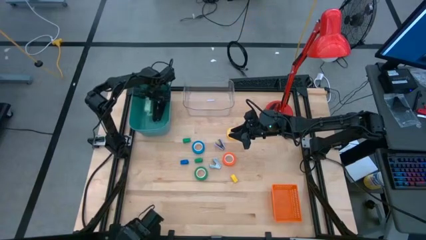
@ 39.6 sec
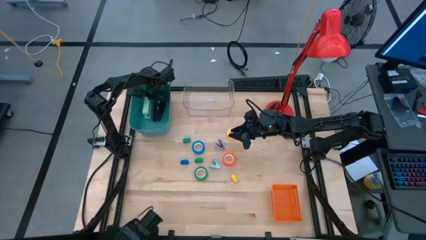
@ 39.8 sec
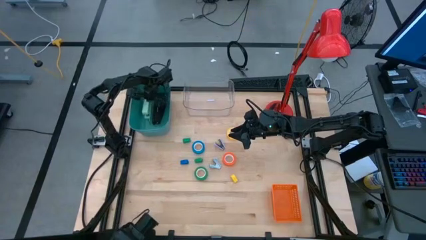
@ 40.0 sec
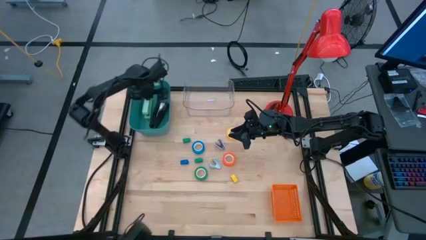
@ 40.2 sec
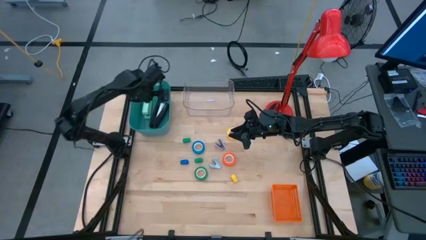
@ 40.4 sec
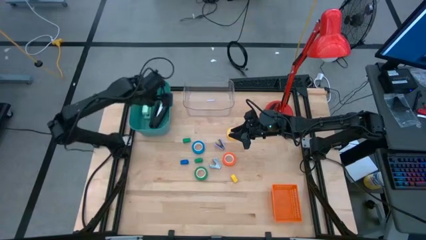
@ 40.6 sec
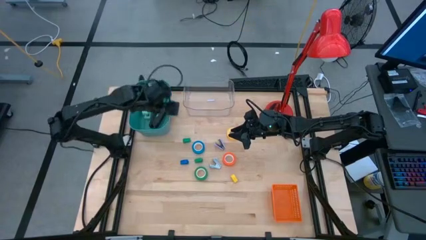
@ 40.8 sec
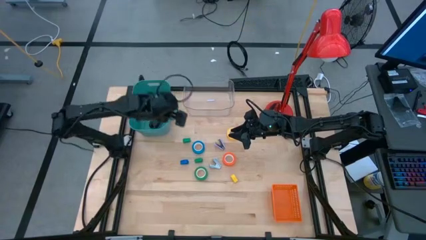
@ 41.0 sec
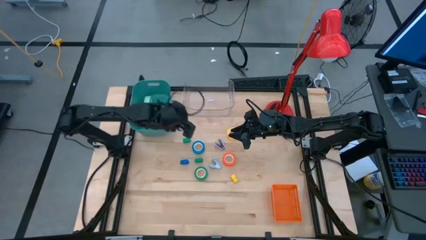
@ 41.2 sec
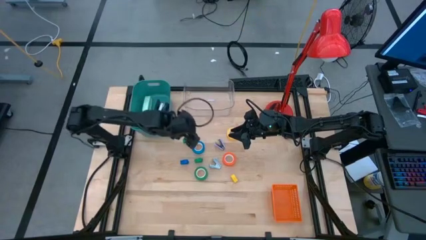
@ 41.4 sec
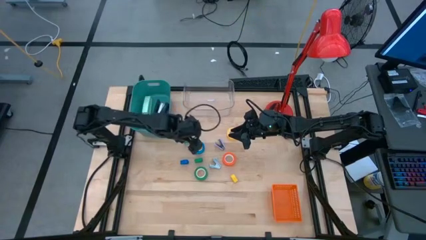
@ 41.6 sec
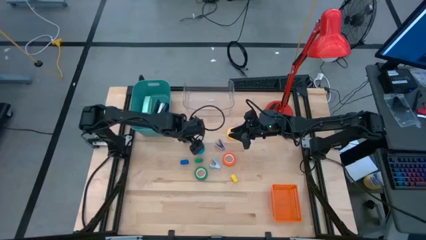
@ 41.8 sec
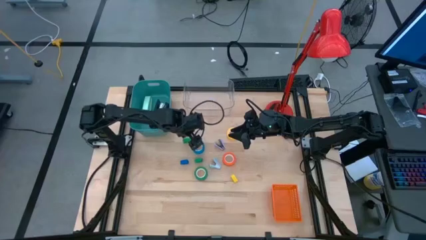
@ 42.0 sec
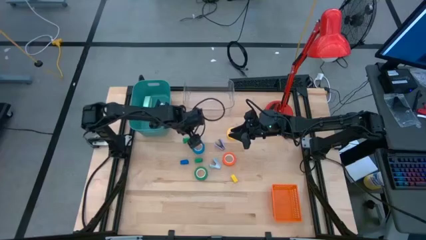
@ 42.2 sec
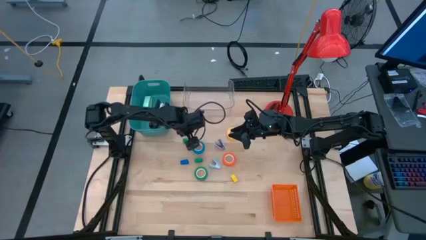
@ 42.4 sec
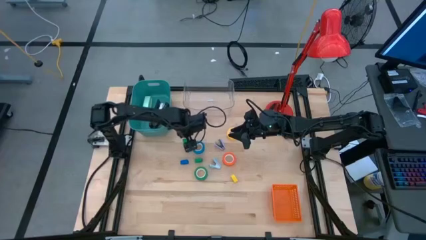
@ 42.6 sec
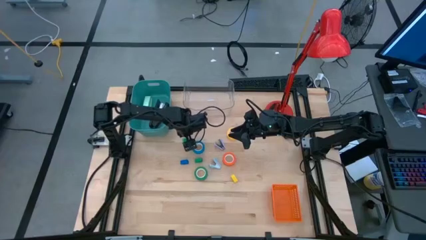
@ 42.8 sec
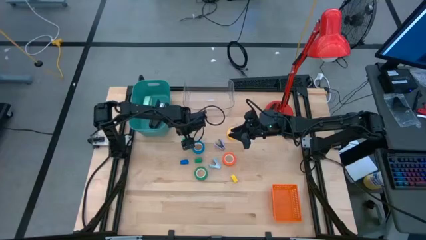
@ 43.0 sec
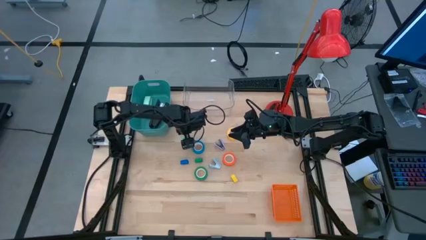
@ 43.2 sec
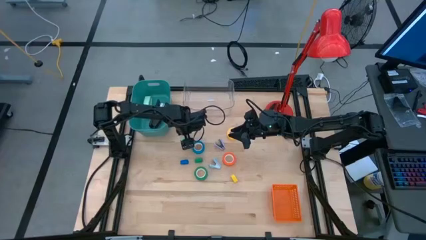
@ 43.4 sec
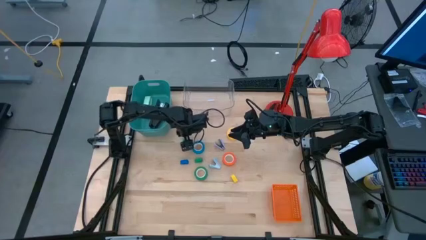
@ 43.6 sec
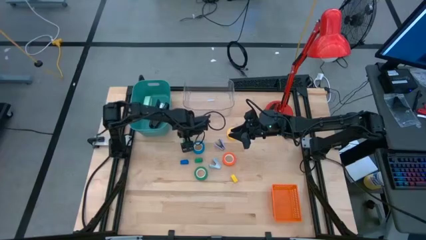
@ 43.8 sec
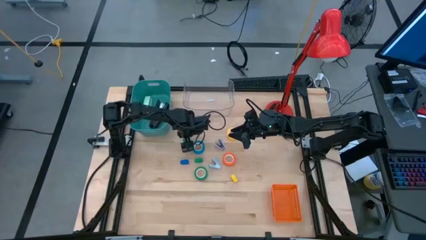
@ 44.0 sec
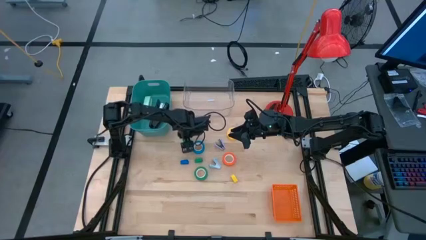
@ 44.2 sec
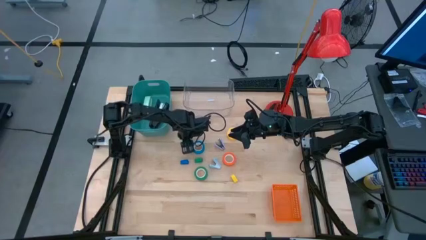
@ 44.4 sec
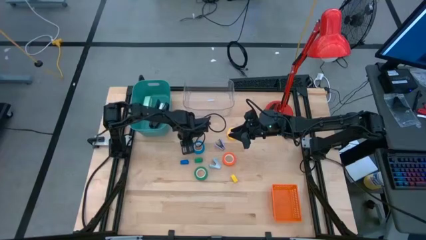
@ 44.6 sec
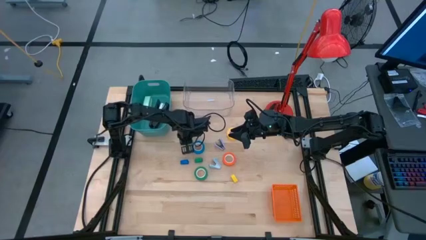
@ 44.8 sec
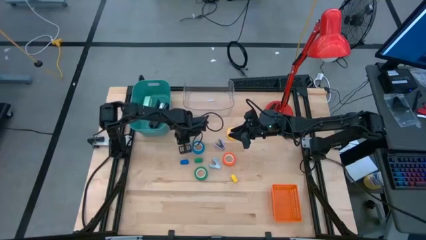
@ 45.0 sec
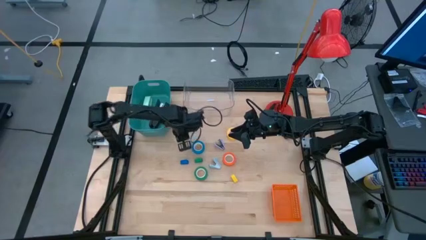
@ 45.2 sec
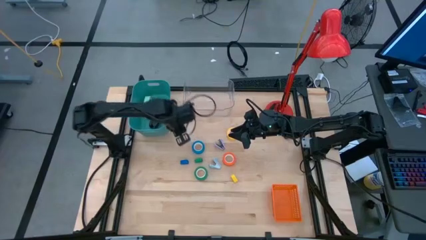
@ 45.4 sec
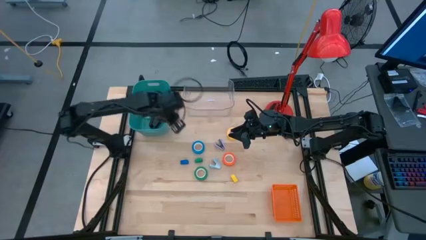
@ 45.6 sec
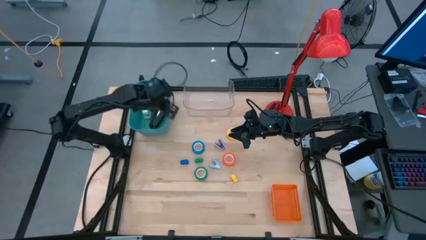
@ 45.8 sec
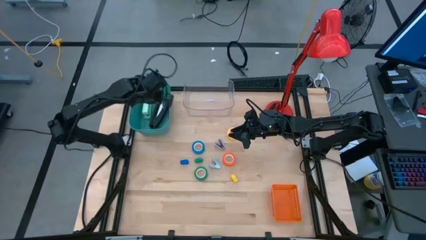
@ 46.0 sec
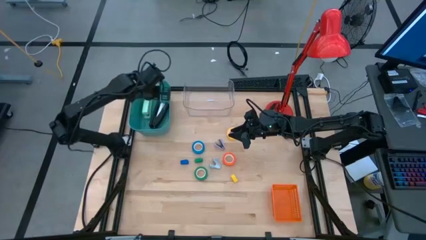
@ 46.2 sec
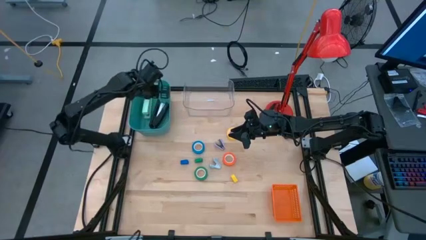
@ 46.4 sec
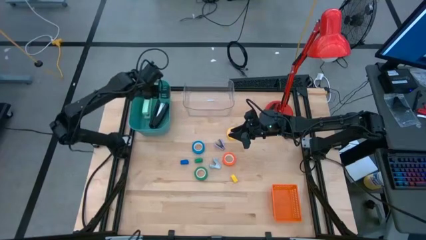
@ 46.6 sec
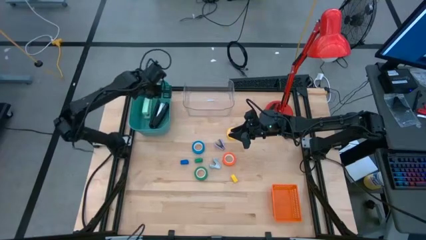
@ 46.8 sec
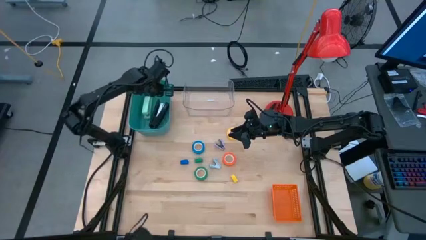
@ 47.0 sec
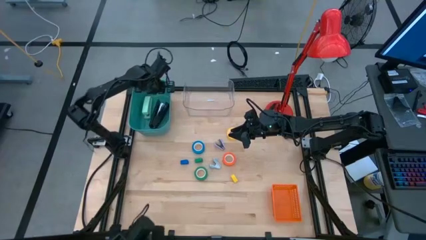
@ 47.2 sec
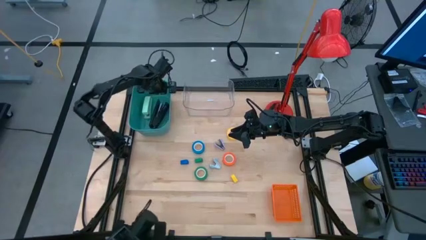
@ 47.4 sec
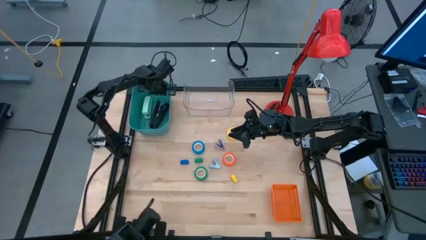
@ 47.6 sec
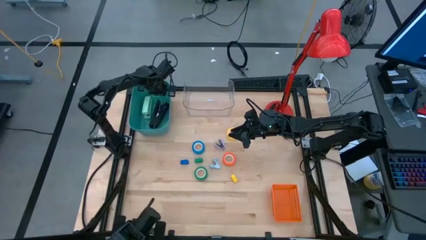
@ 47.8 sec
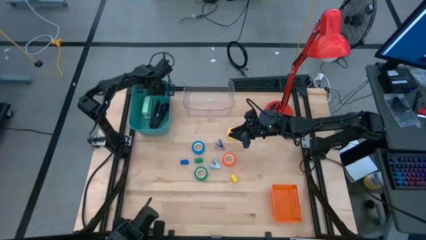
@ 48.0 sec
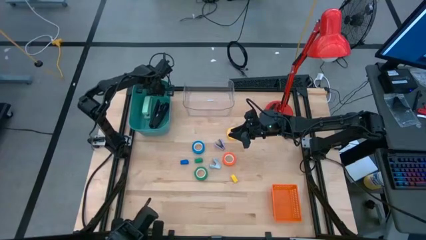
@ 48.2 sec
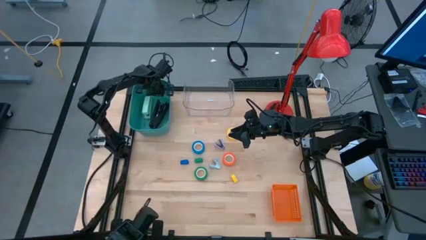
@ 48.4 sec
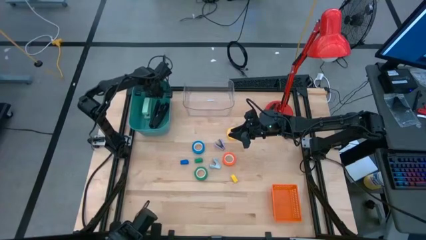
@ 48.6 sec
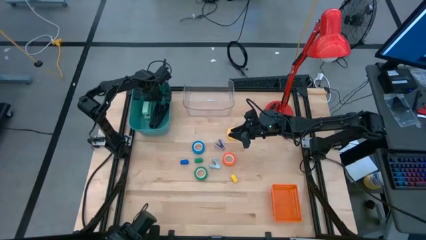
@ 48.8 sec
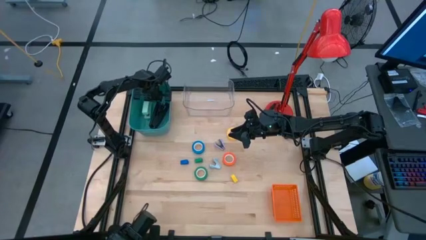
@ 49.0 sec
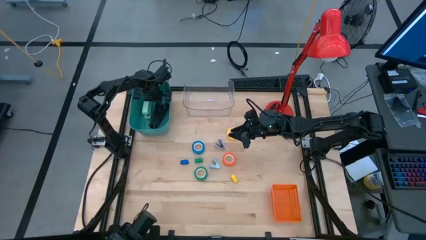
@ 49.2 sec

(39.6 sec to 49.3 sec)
Task: Pick and place Stapler, Stapler remover, tape
Put the top green stapler into the green bin

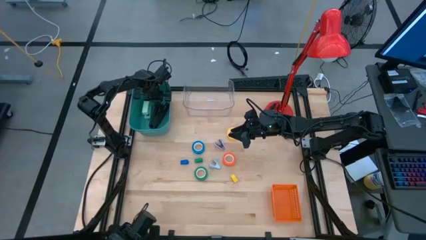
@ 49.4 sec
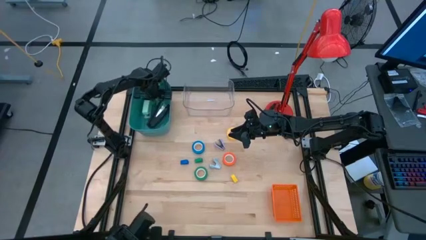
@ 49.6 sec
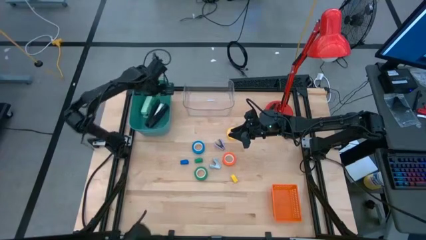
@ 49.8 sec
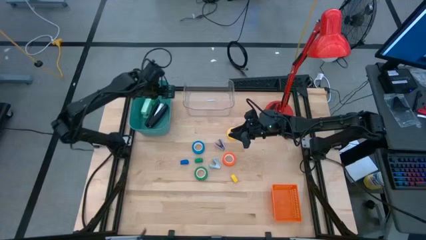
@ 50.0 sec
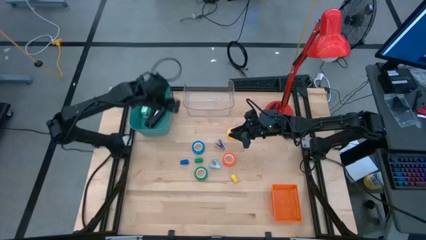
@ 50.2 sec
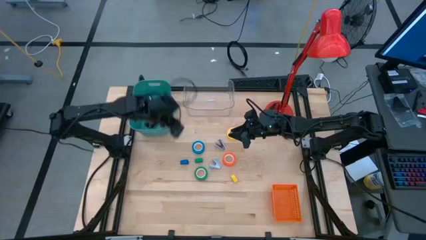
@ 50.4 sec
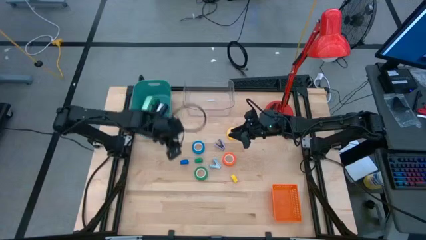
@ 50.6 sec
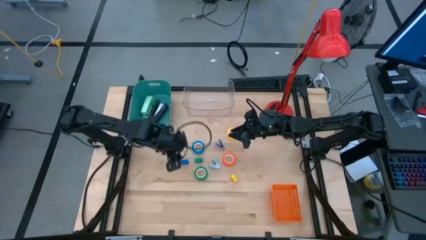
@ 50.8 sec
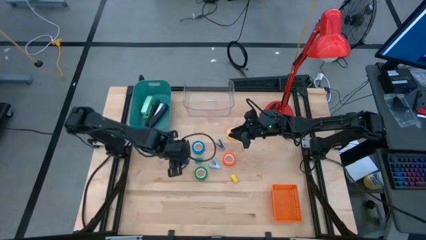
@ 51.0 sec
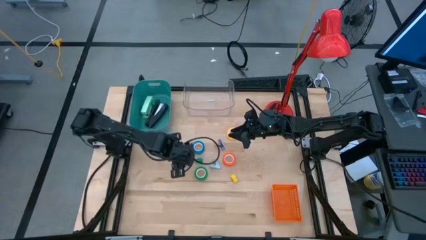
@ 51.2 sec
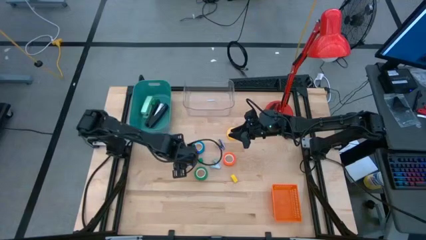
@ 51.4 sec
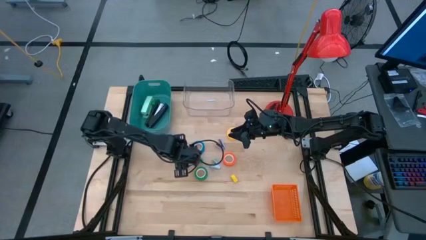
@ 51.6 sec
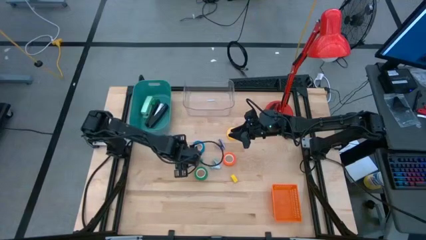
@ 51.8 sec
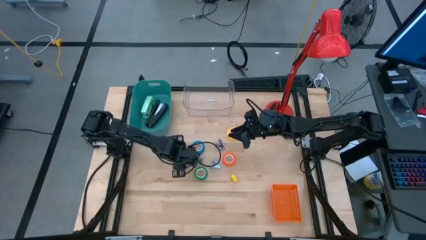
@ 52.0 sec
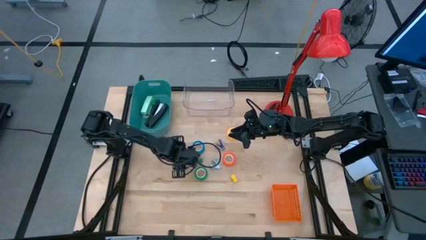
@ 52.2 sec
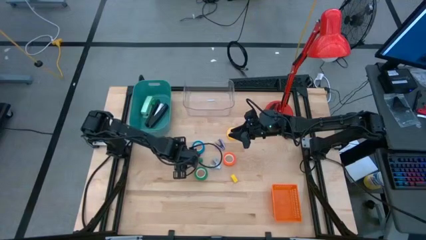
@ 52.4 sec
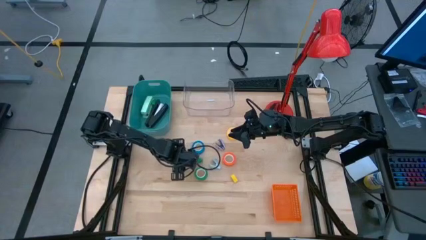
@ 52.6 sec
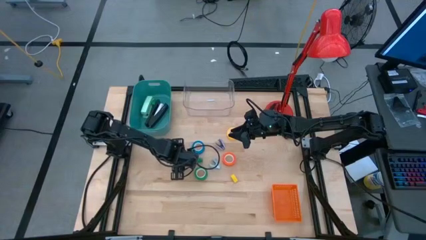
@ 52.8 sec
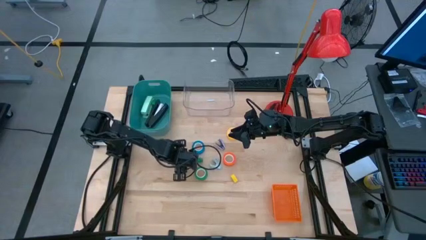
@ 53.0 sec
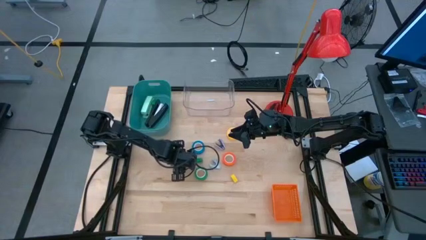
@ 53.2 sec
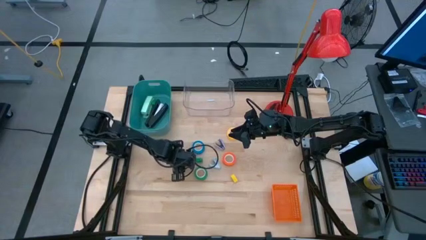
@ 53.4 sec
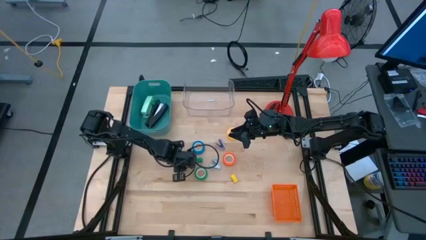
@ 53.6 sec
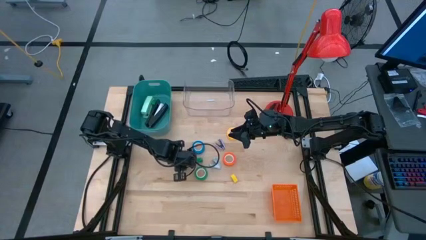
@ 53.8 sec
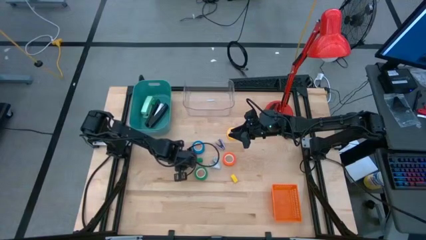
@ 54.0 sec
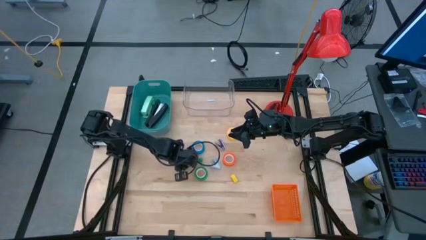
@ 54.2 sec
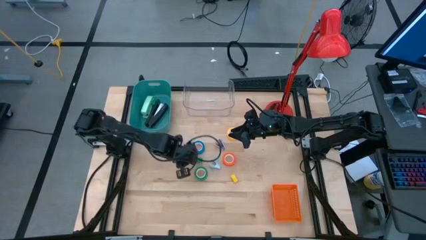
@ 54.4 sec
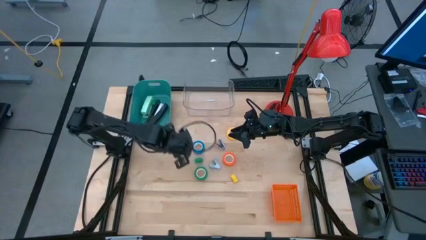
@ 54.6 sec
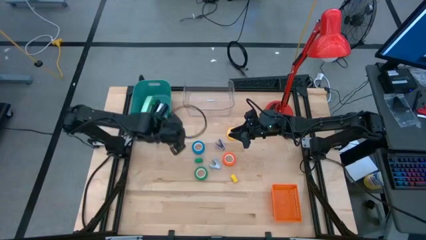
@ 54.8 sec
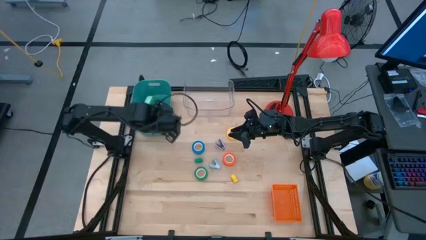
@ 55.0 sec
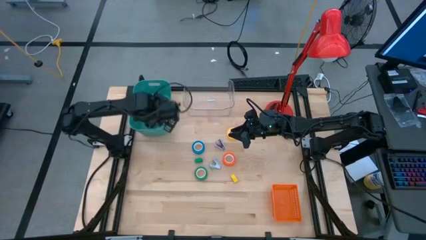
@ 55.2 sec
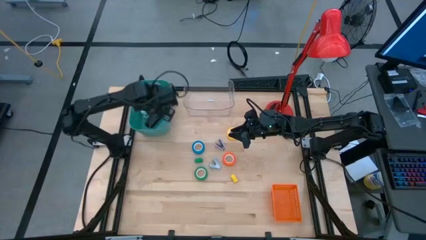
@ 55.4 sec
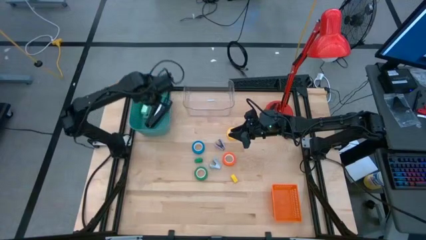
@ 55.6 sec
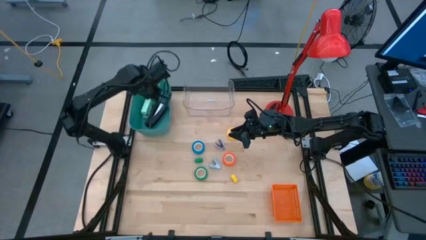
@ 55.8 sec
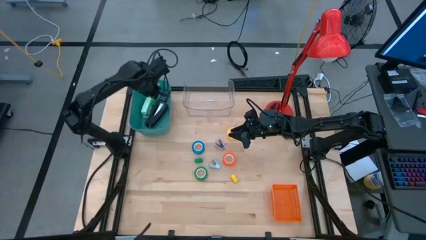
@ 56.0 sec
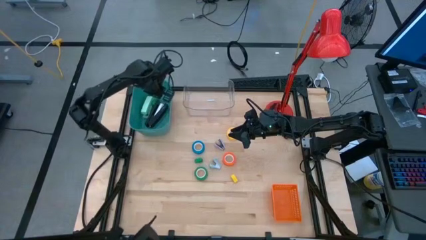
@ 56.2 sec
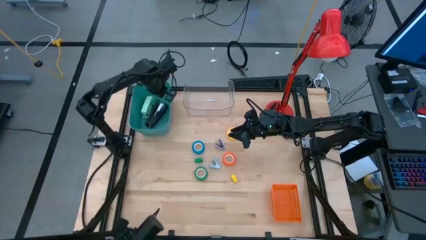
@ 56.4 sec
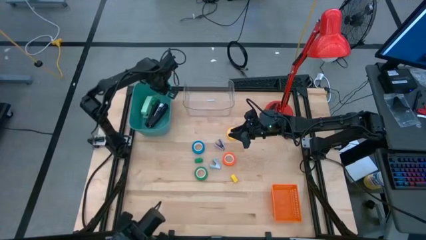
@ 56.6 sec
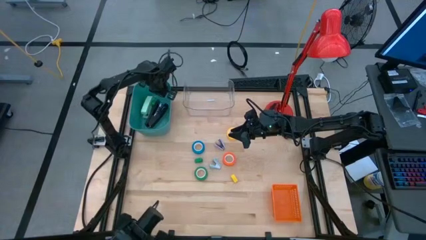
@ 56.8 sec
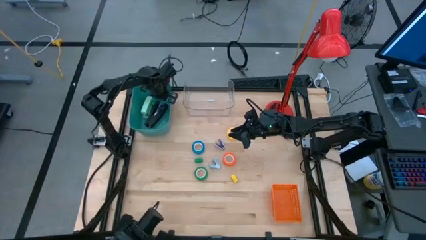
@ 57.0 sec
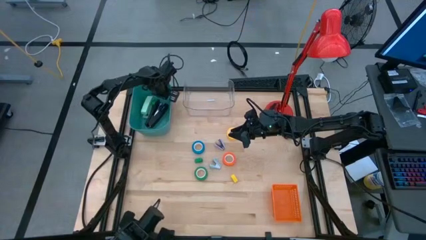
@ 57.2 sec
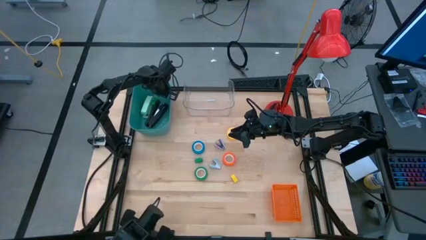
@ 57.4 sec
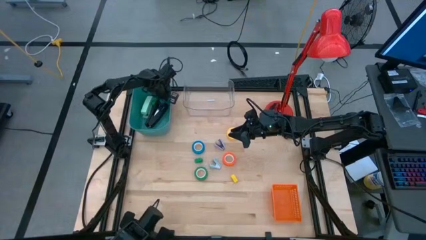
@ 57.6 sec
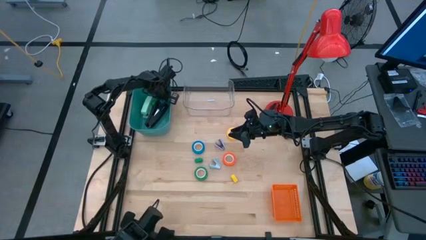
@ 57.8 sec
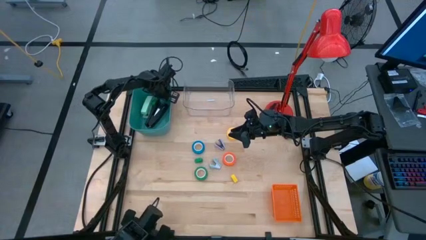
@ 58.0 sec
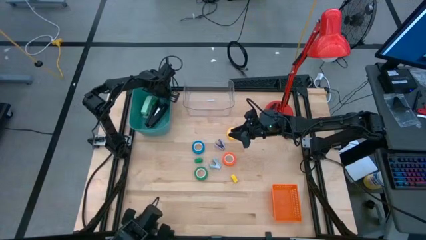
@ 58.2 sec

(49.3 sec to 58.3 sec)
Put the blue stapler into the green bin
